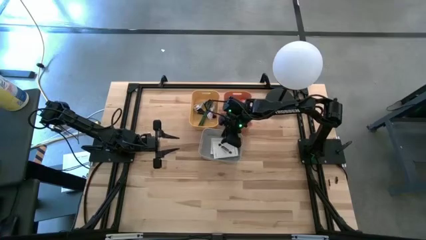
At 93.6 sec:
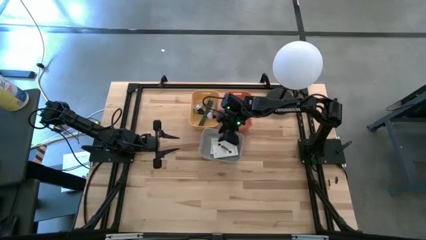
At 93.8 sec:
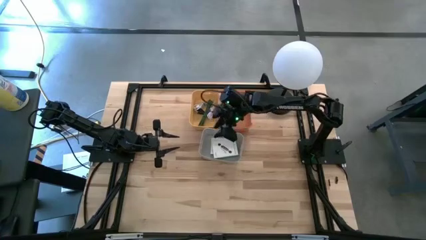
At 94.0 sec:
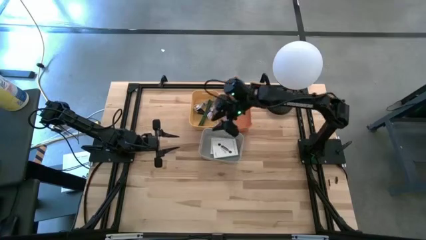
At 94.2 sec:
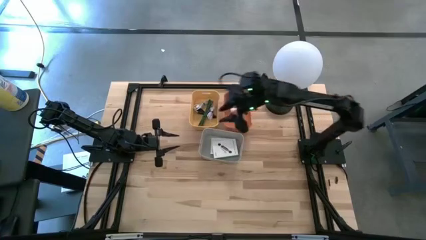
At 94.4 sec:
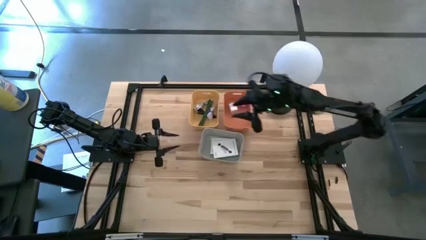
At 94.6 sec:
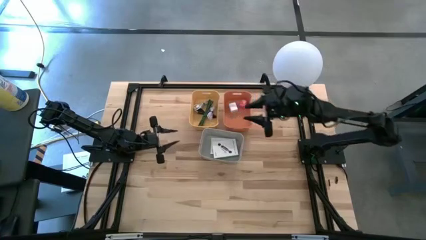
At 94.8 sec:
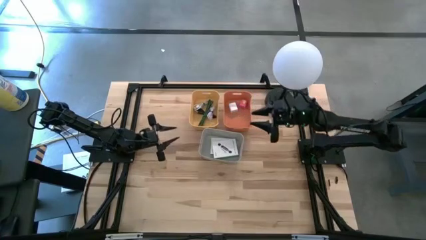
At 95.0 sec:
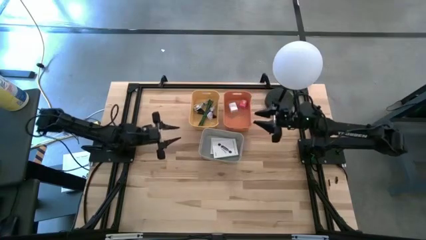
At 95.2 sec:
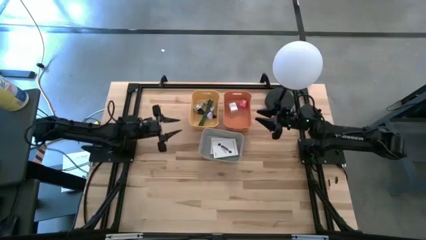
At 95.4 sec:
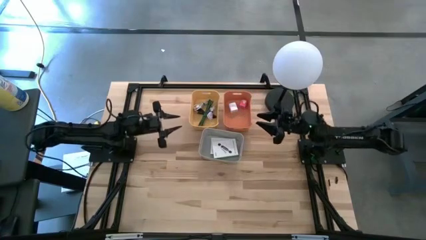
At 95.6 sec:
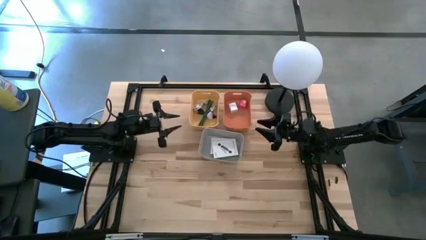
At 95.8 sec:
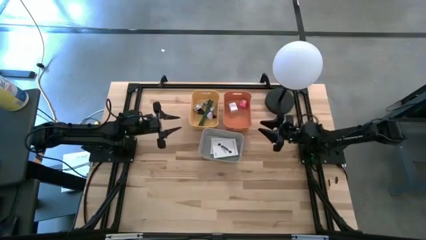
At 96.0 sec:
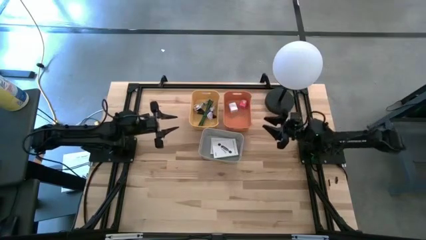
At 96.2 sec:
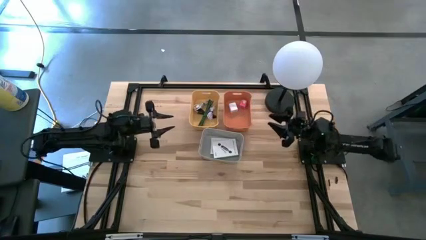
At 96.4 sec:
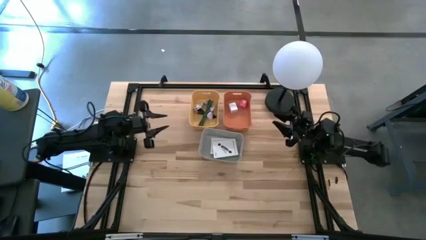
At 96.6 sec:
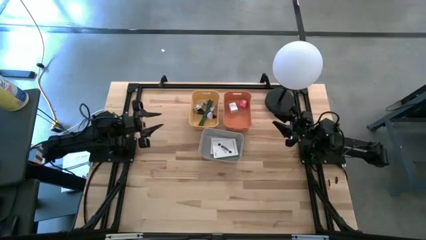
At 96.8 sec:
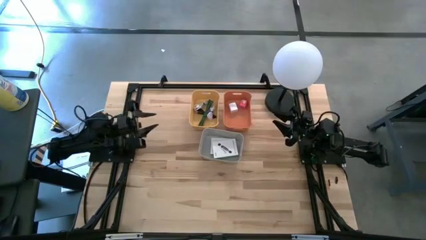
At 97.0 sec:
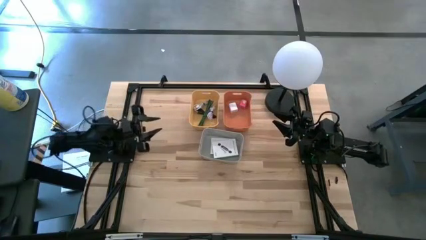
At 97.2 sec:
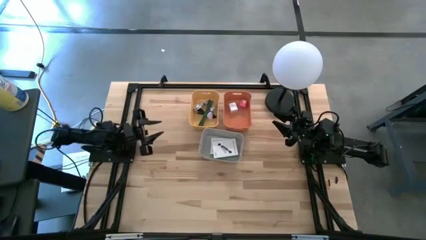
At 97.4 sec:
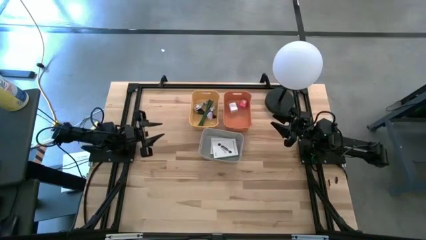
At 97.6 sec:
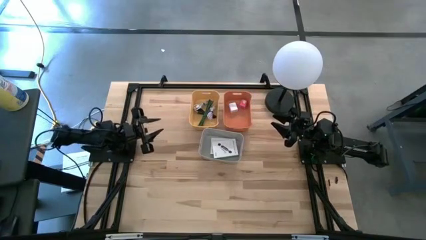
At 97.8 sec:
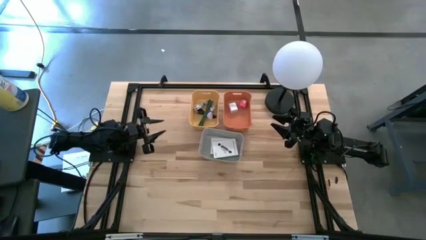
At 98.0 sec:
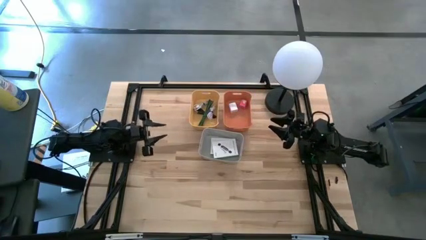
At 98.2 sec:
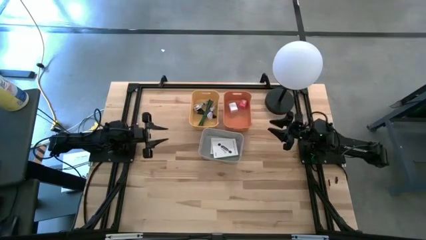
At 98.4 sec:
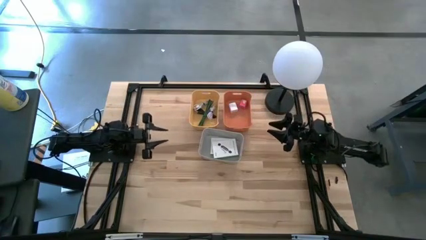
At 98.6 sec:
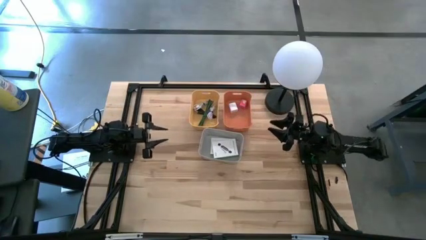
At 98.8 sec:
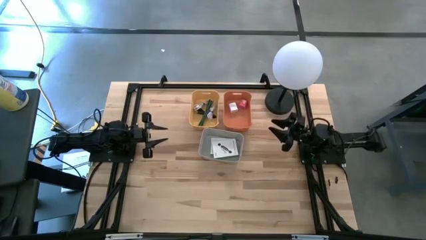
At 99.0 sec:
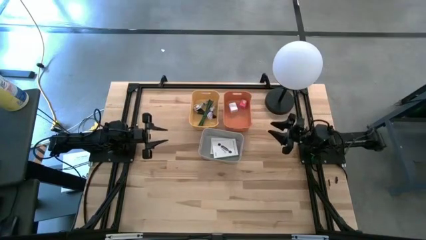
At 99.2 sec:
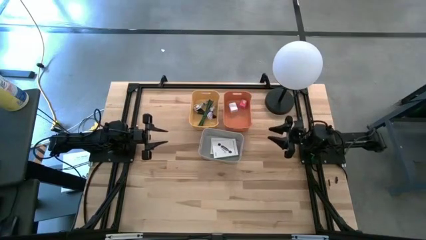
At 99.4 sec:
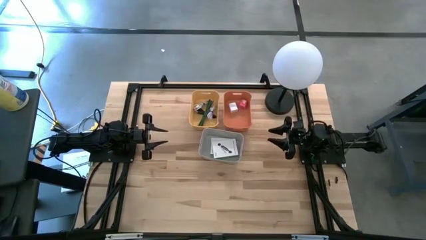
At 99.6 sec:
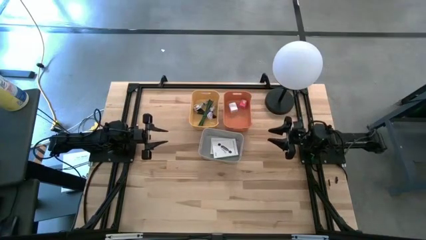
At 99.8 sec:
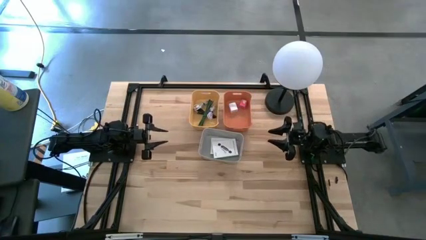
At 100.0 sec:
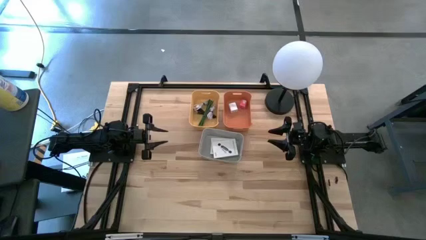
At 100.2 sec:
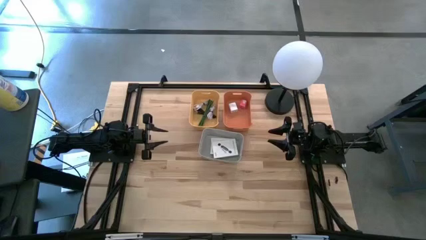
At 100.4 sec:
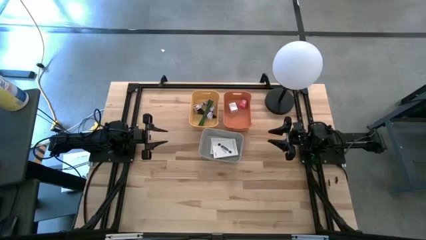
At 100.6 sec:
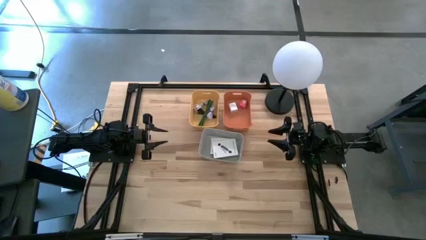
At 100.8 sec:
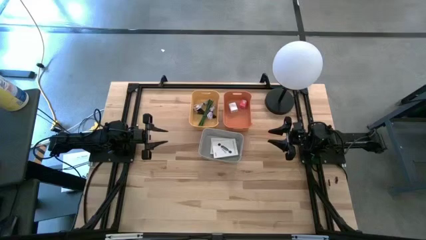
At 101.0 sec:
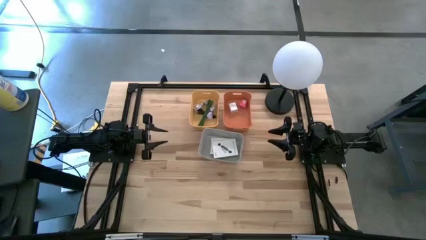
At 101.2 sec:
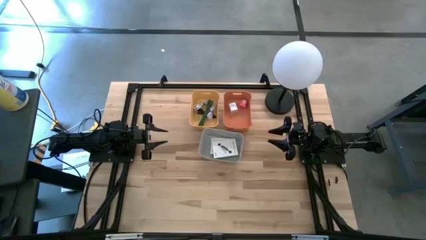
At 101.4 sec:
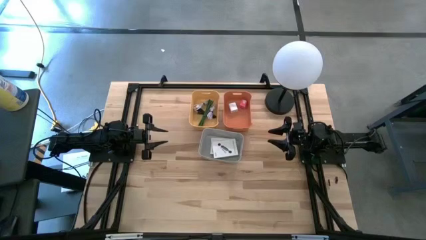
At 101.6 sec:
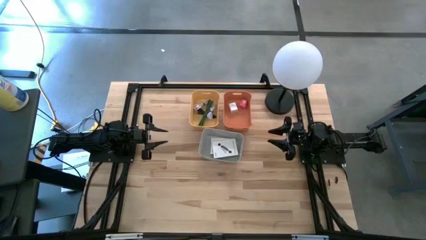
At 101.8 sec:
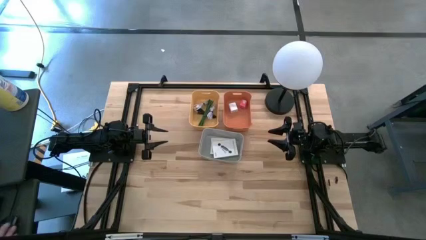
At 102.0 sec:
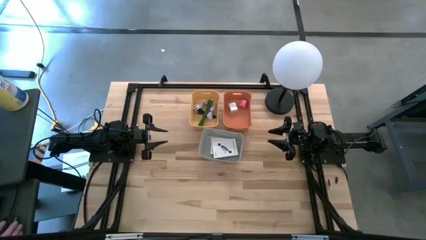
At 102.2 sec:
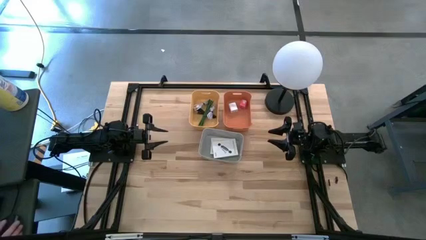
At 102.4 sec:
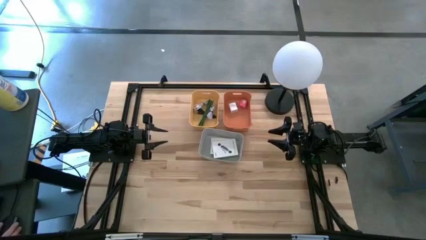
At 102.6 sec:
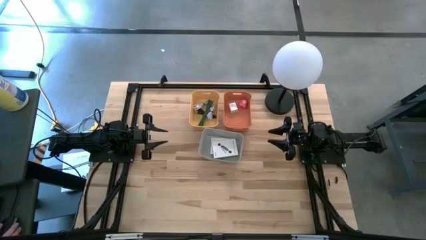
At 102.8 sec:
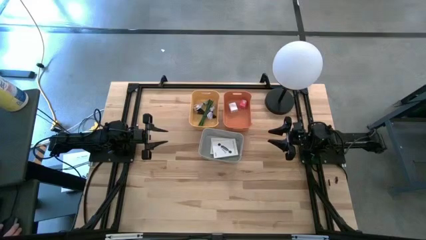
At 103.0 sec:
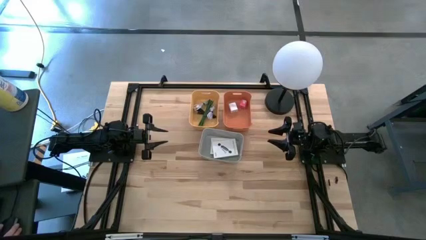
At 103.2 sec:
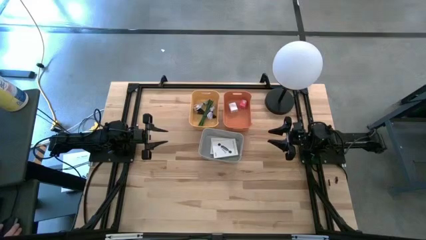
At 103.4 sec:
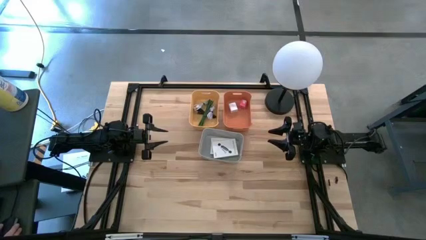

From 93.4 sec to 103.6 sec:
Task: Pick and place items into bin
Return to Home Position
